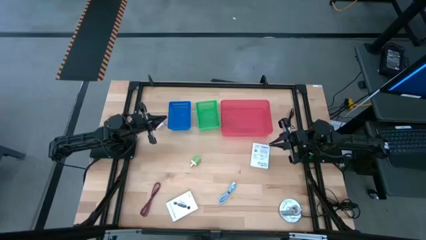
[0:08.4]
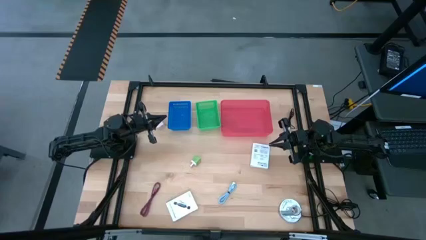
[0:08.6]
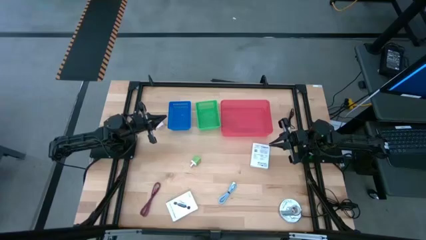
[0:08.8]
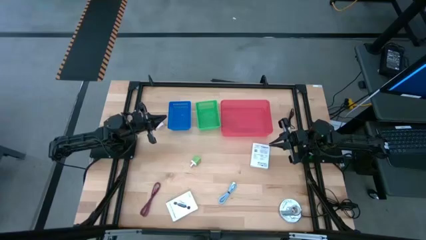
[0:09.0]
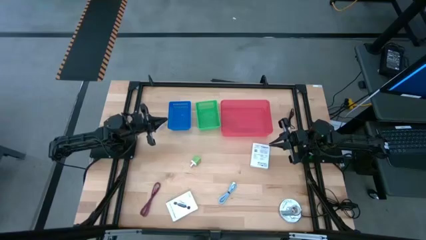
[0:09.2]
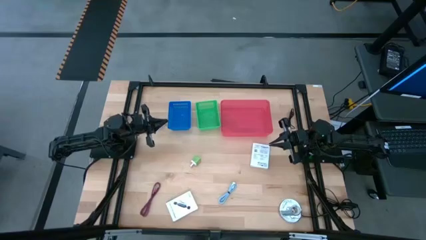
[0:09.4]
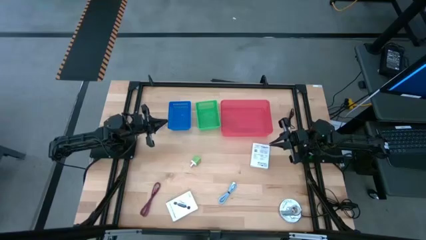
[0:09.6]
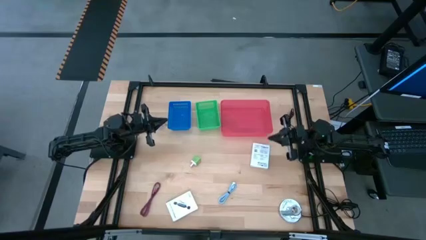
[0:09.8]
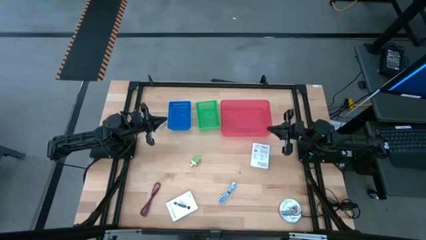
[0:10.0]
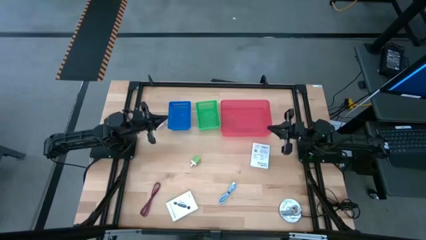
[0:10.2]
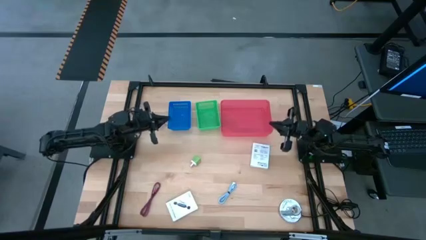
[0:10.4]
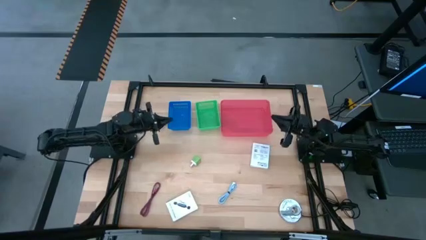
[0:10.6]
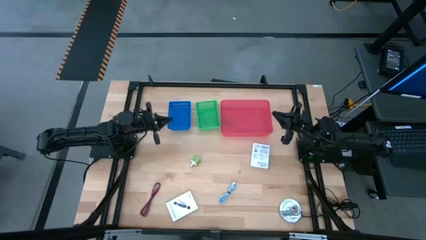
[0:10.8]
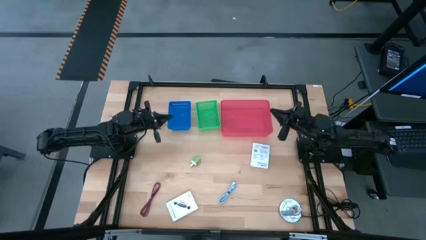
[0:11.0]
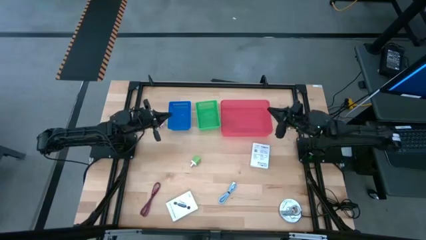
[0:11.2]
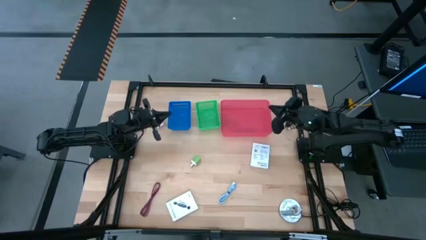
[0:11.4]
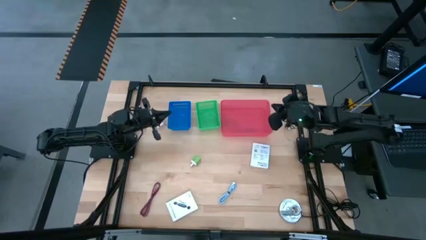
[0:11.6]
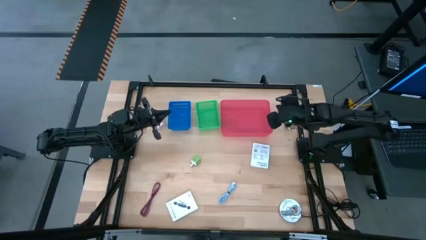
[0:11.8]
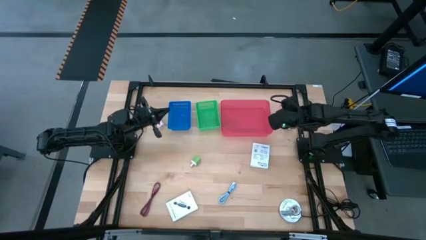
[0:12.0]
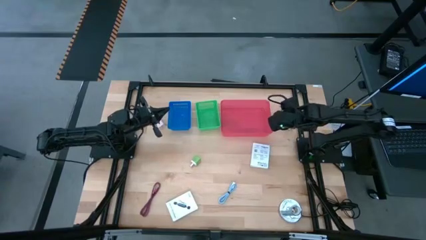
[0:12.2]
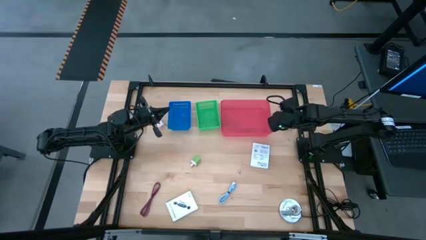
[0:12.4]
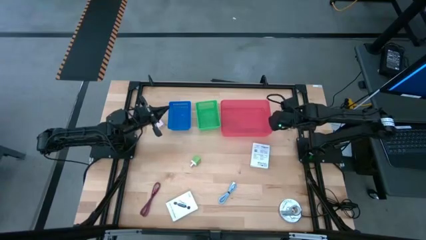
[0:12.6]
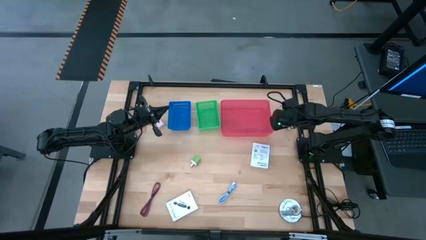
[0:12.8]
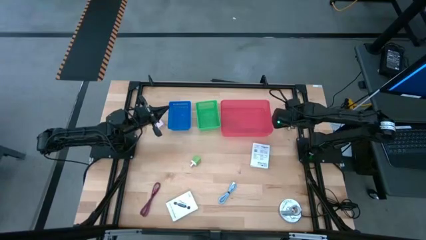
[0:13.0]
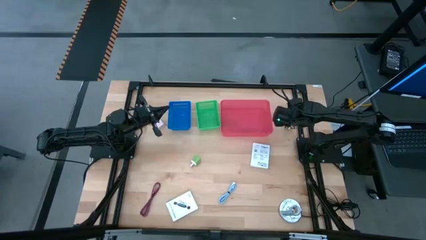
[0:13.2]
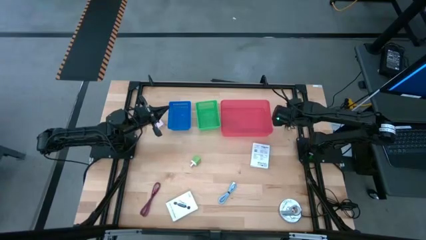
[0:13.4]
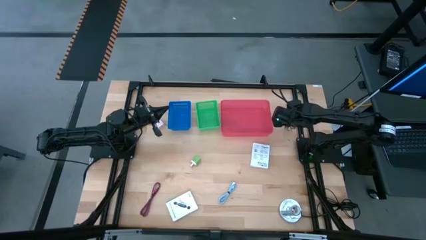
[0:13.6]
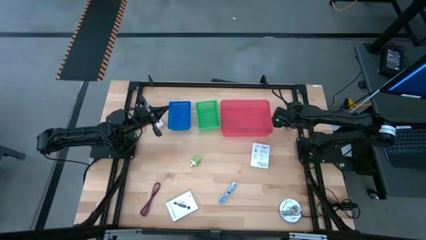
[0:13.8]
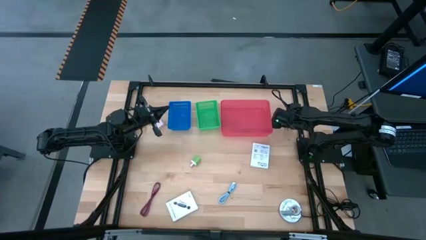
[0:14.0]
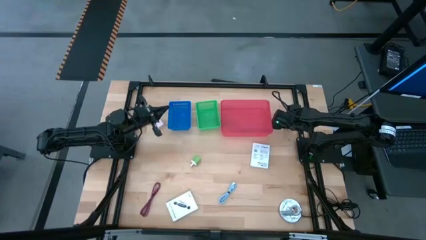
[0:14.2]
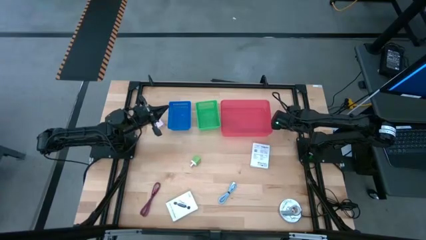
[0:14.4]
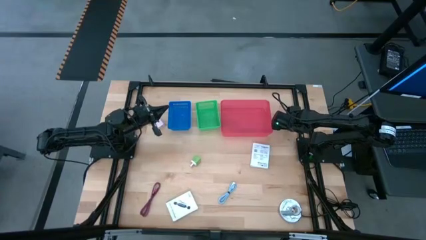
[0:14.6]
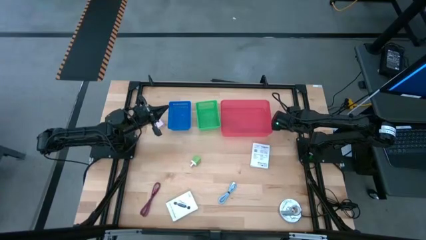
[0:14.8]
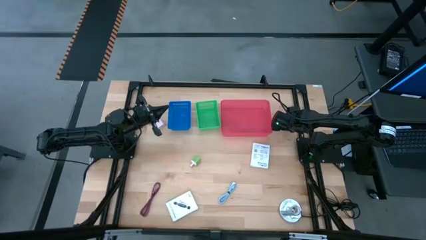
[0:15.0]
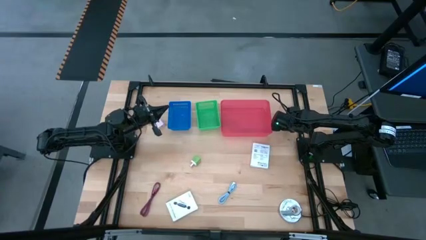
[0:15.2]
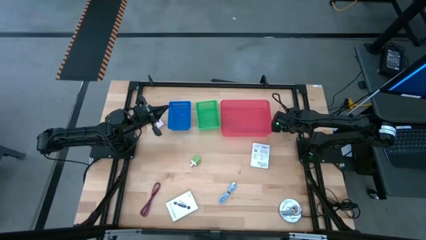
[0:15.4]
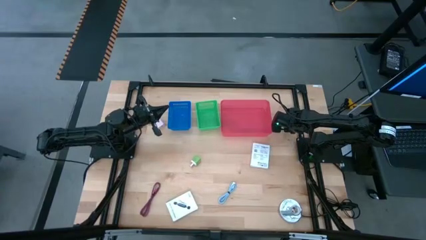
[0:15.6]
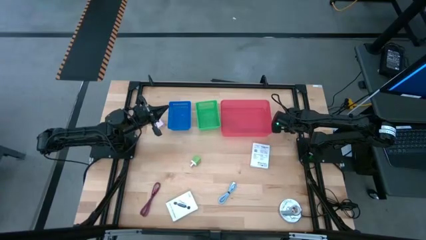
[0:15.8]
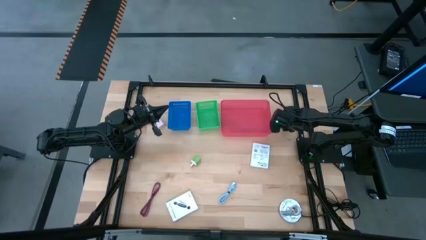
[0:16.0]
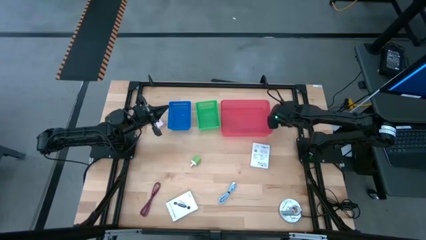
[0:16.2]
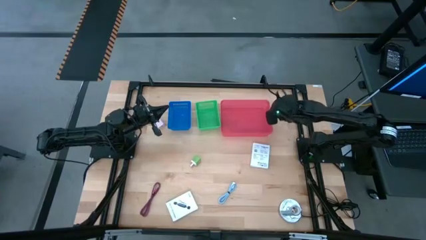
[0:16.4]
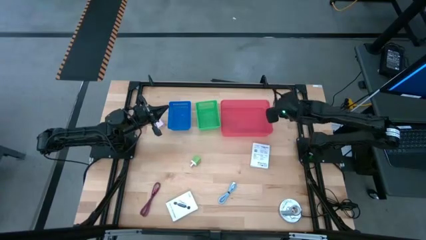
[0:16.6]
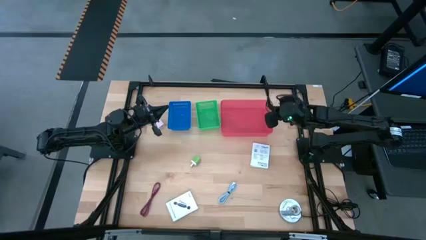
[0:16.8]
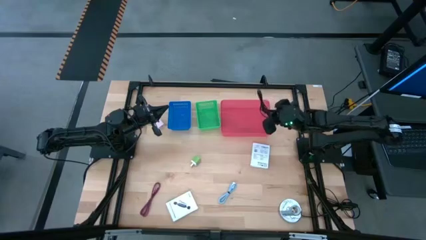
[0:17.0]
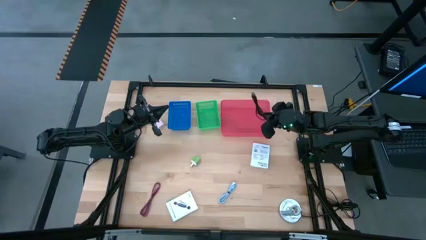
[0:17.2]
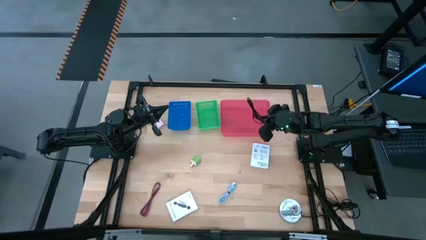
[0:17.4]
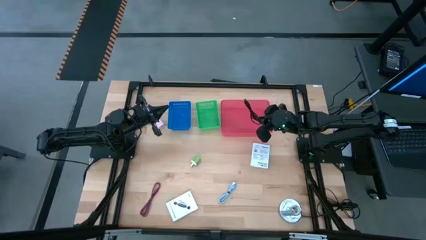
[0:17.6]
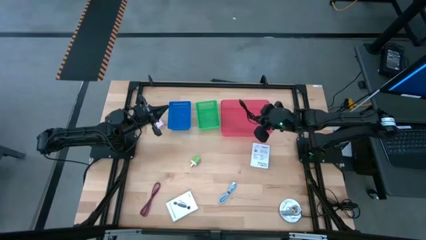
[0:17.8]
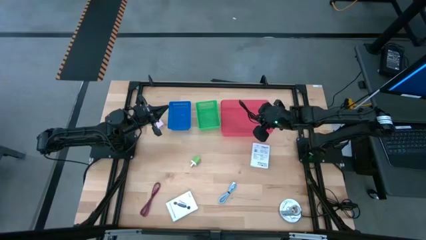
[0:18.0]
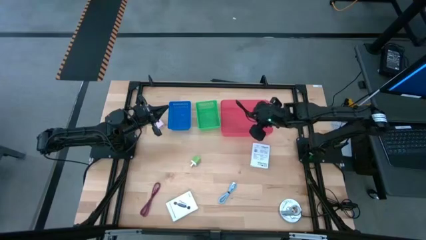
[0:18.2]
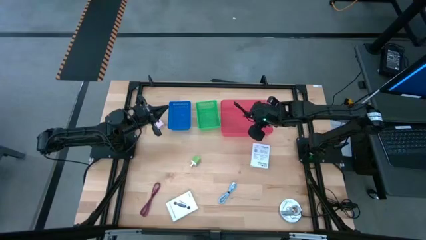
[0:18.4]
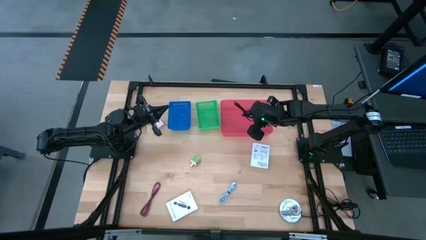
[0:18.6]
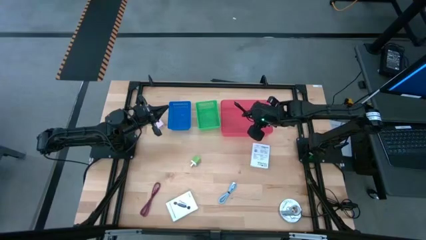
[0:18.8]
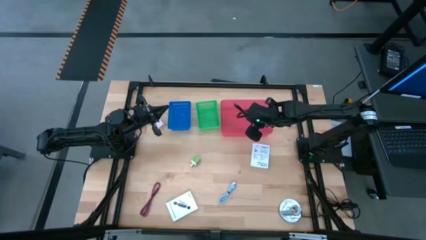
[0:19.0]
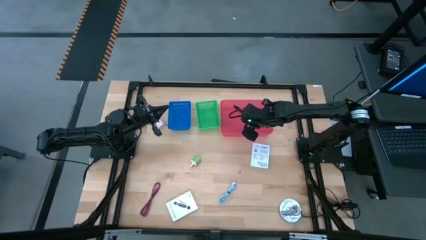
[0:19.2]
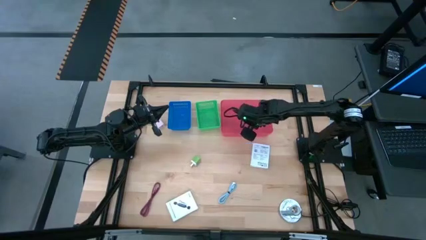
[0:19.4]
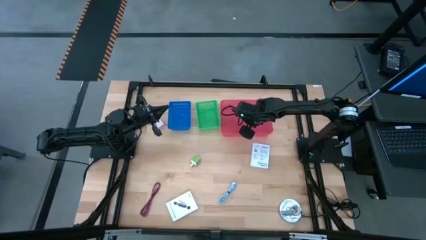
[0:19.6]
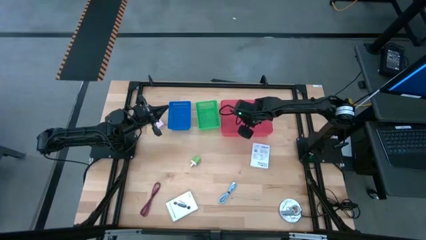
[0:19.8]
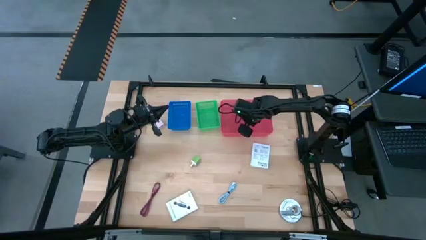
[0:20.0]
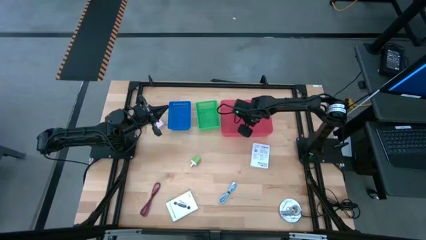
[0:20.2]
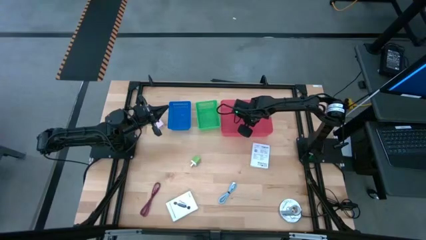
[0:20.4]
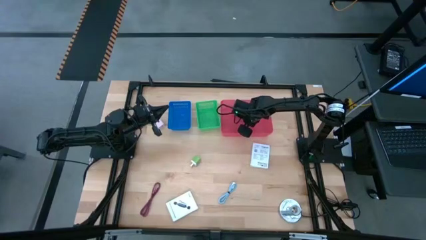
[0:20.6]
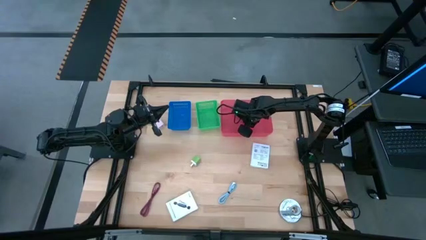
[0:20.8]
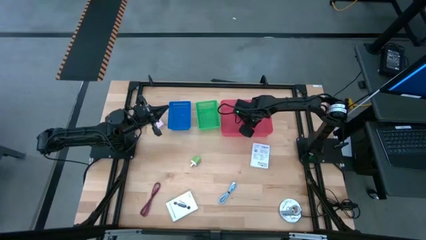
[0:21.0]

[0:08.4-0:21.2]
Task: Pick and place items into bin
Put the black charger cable into the red bin

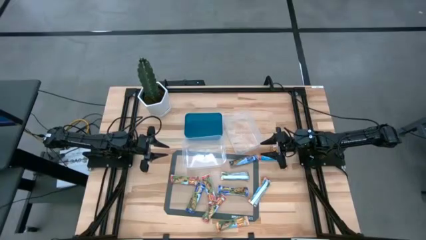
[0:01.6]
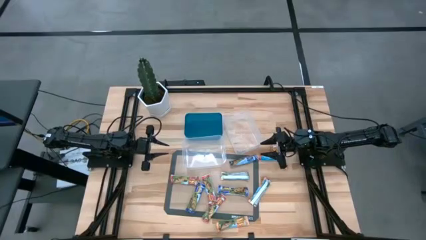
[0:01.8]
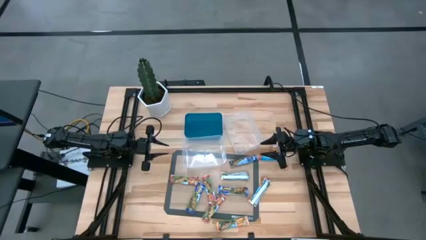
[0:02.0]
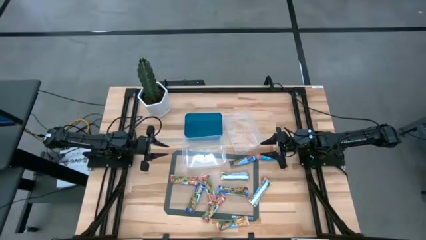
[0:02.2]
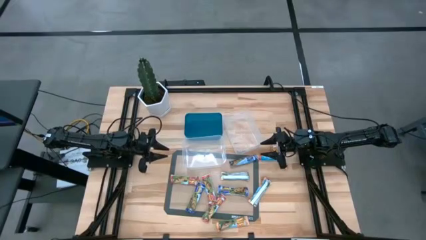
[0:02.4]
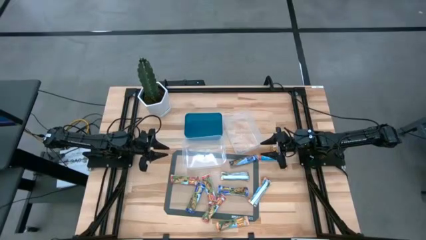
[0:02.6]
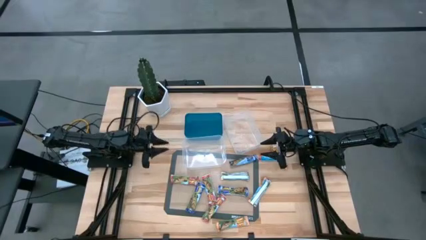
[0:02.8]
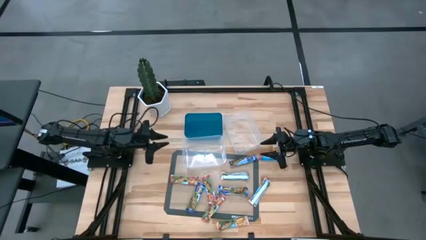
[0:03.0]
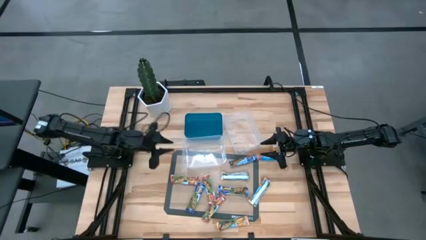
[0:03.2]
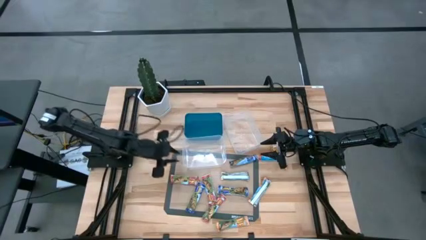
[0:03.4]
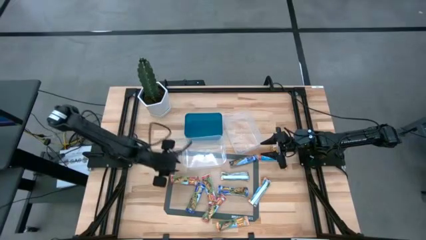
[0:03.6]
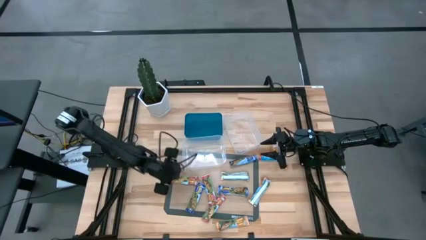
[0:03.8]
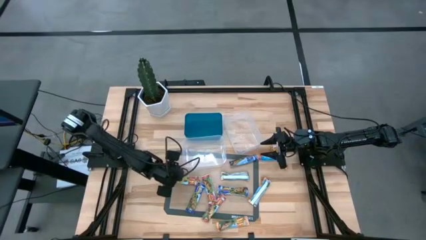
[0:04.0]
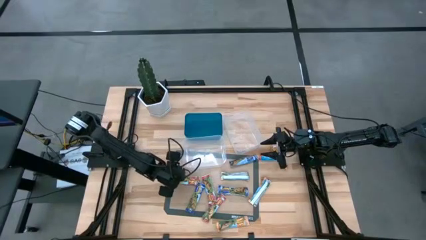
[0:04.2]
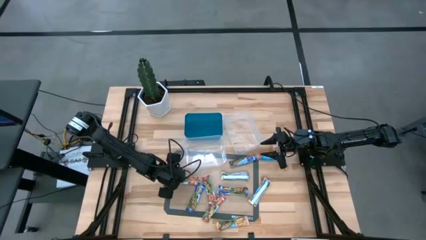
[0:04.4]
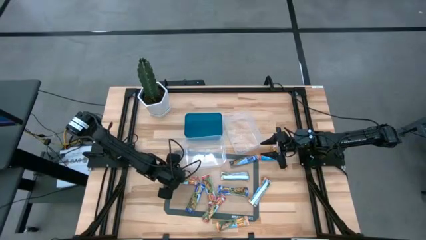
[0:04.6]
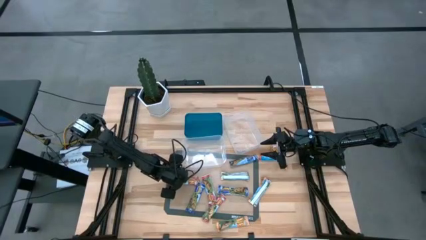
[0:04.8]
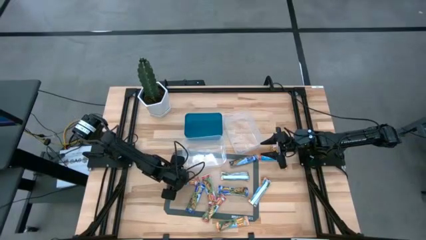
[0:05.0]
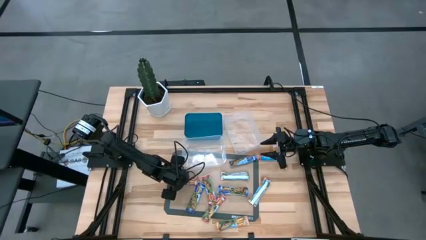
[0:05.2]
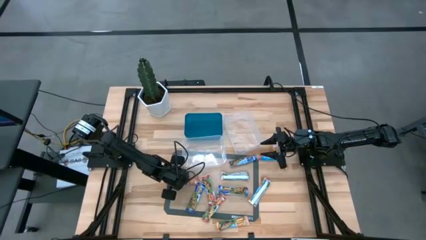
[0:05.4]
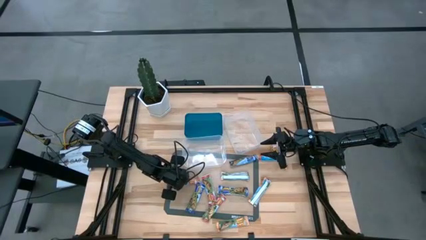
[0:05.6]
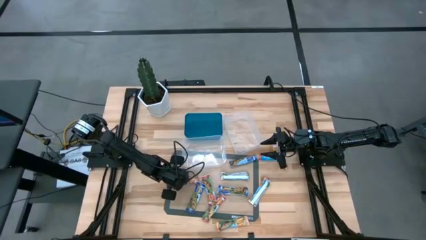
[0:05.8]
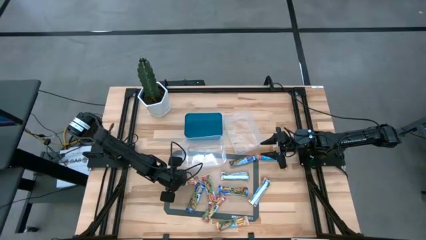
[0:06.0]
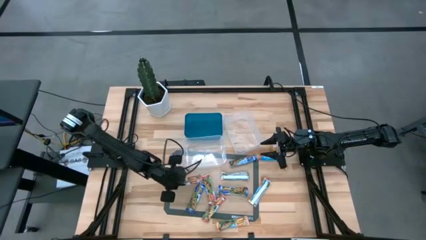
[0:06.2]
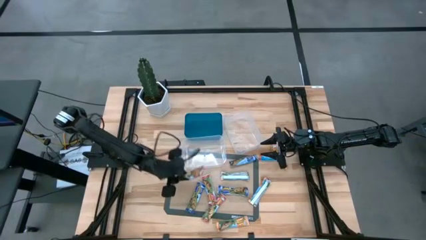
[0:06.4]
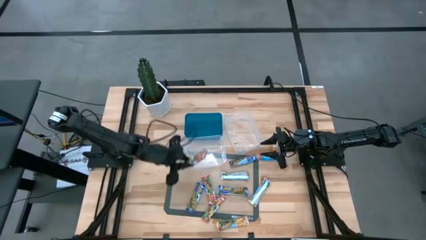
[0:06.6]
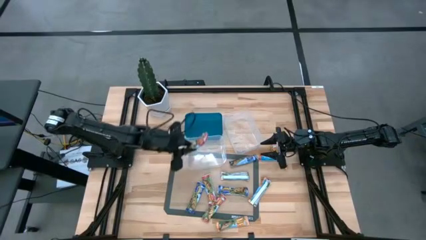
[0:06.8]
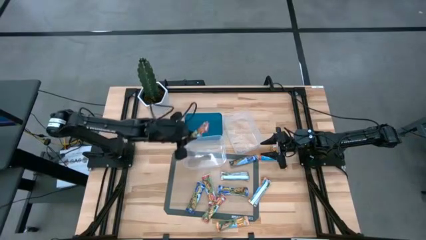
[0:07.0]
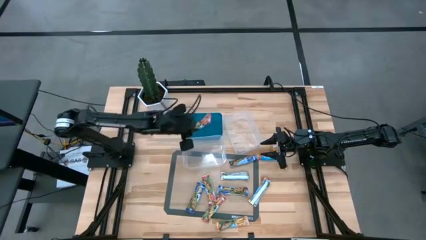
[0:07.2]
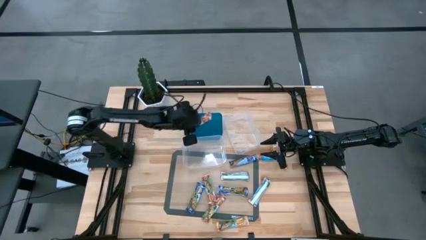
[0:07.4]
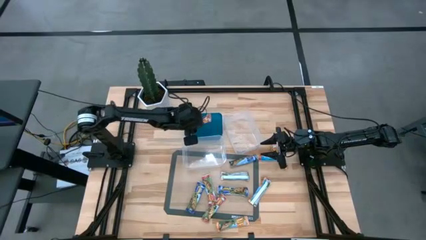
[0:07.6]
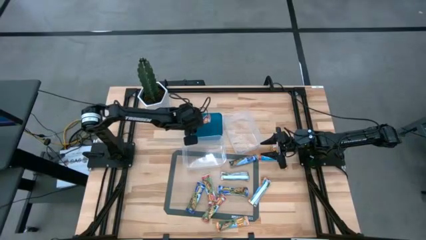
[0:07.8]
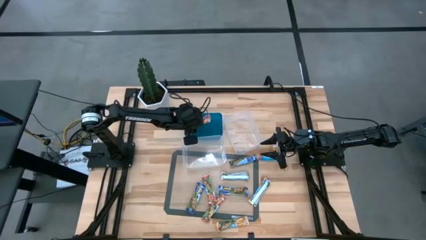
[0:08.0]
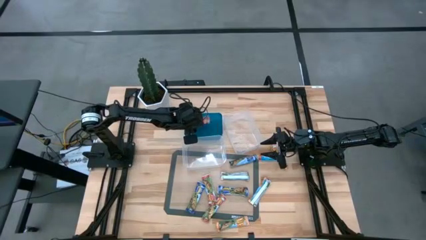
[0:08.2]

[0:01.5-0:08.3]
Task: Pick and place Granola Bars by type
Put the red granola bar into the blue bin
